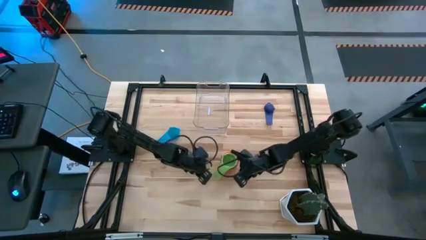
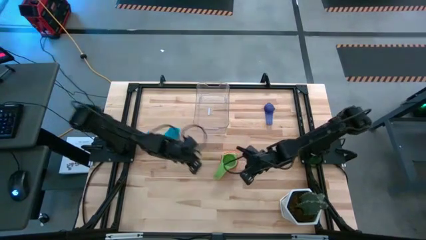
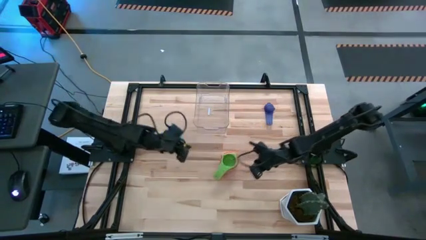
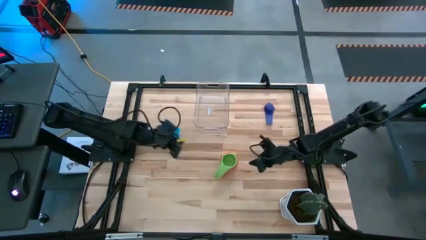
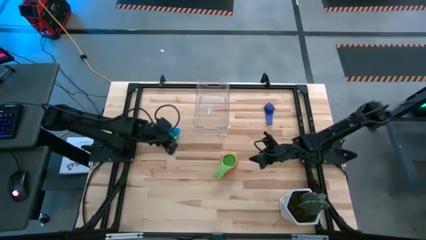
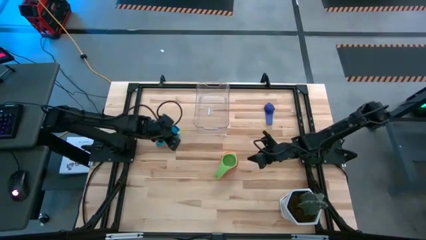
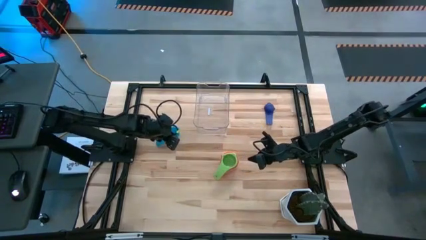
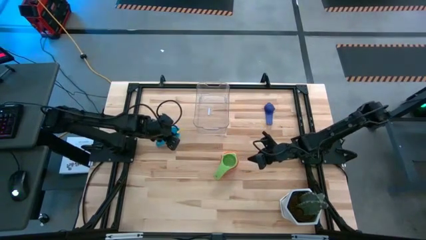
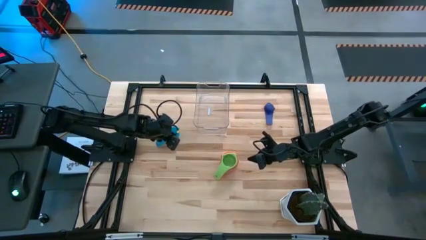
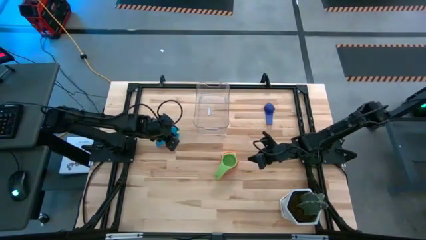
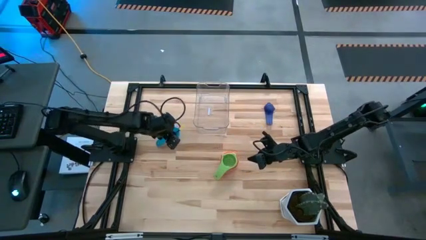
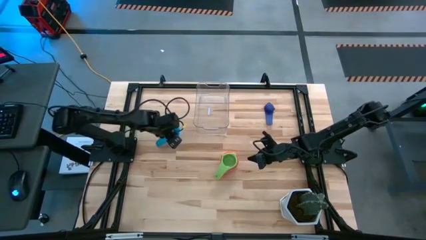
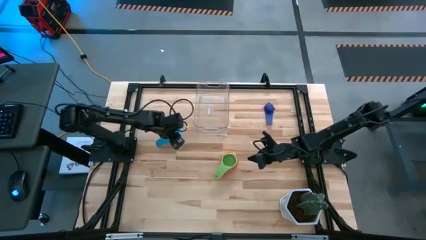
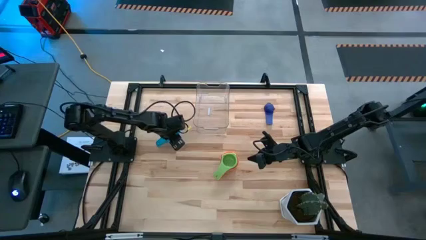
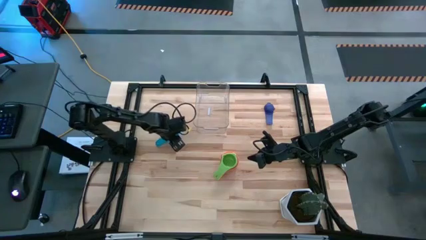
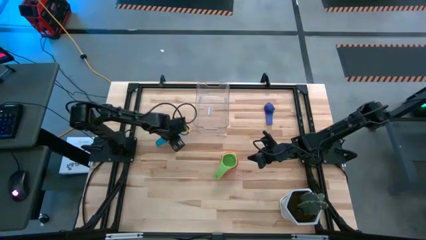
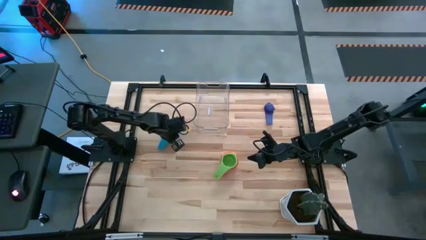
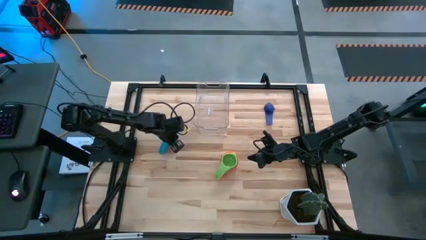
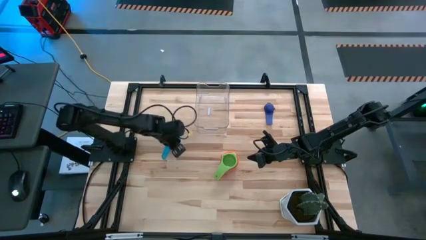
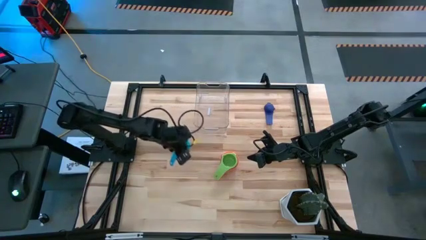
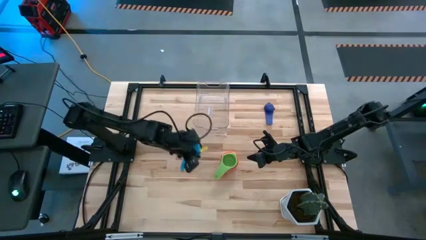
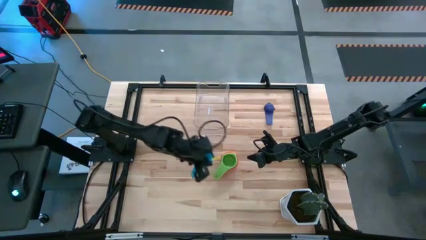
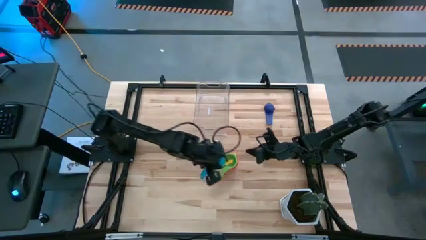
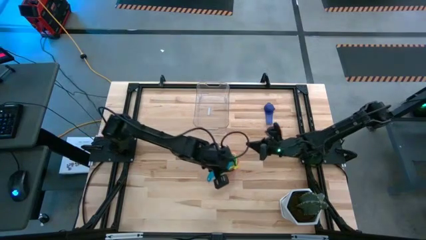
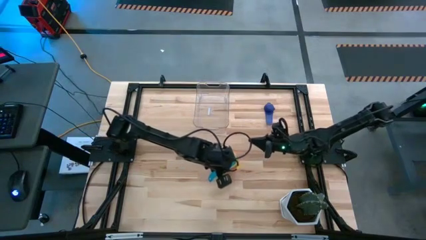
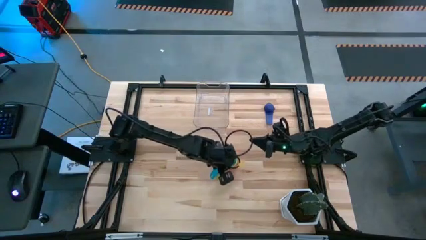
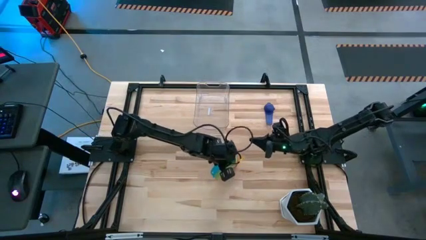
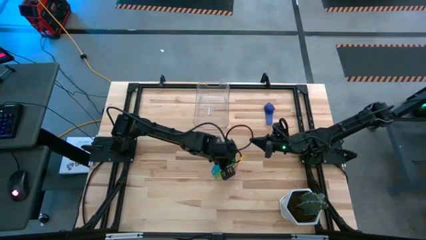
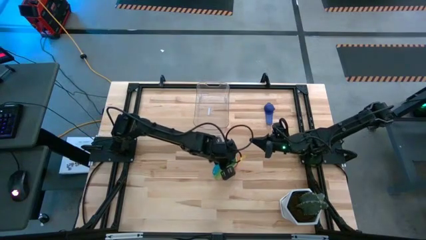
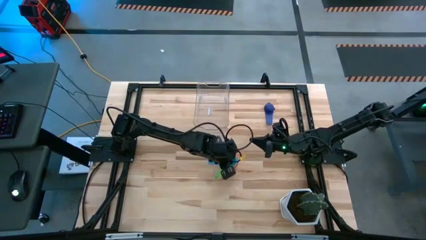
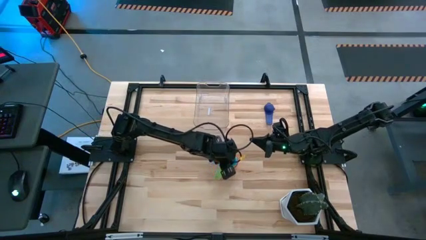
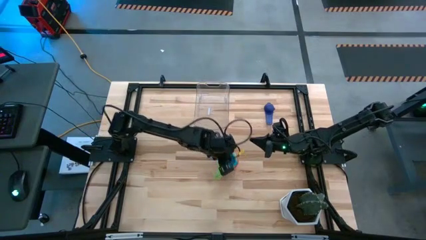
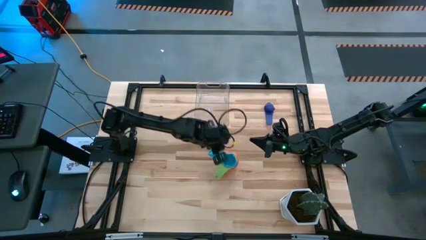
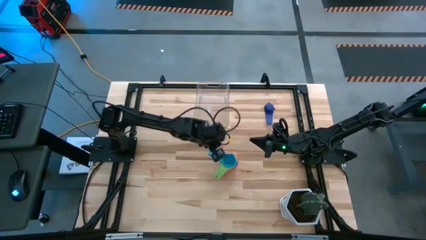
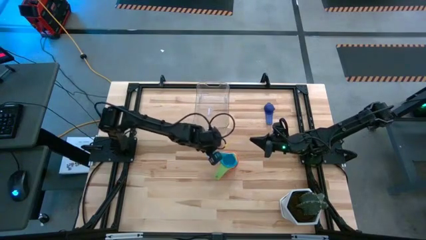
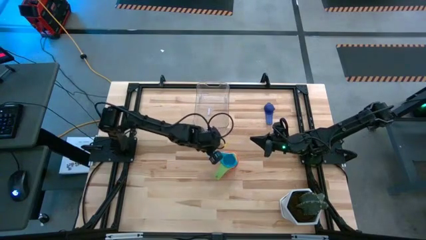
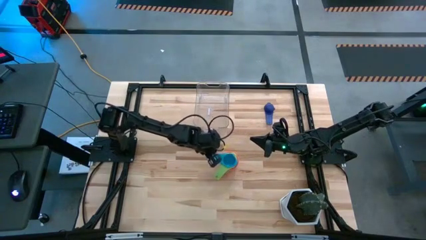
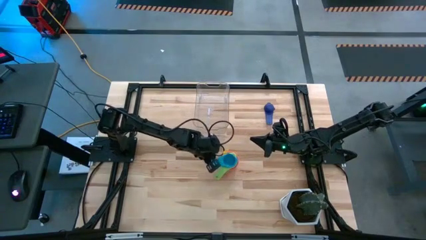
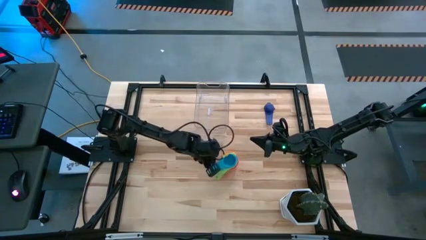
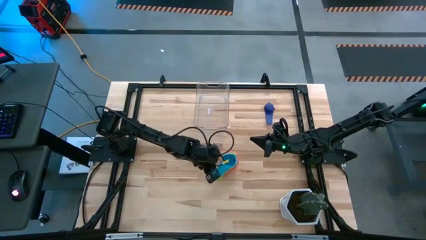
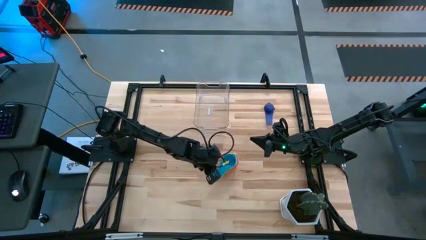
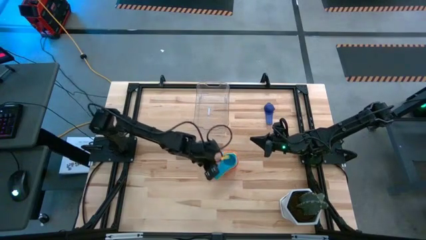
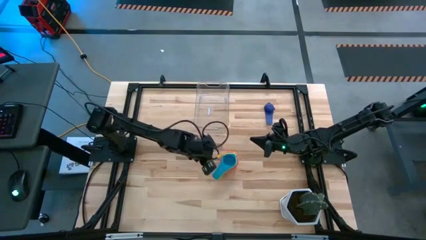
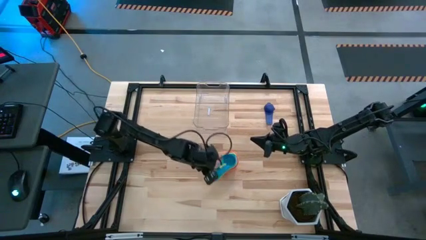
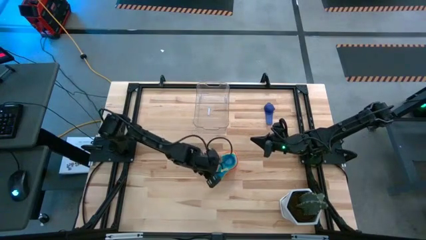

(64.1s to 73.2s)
Task: Nest measuring cups in basket
Stack the light blue measuring cup on top of the green measuring cup

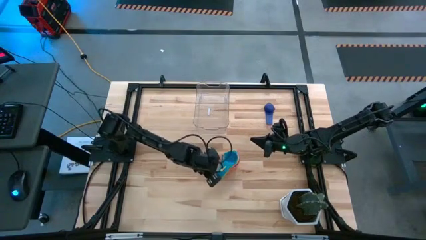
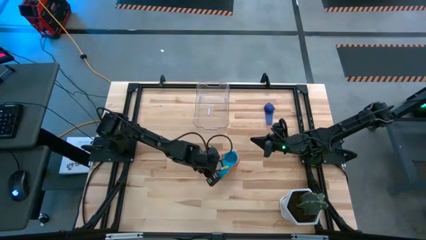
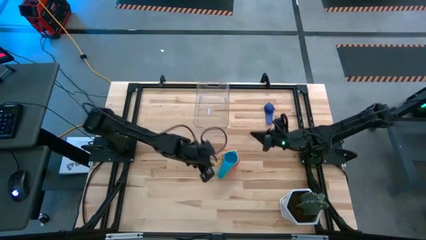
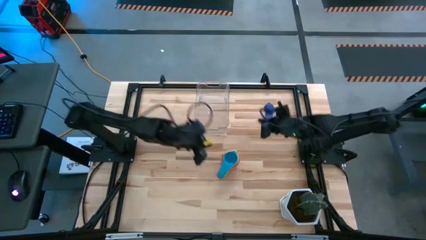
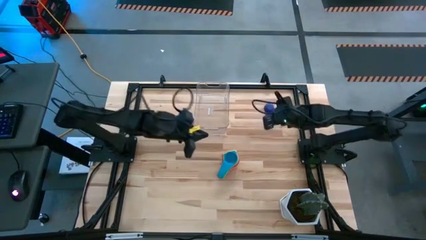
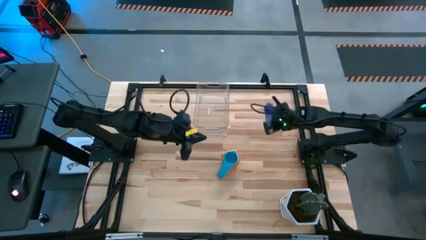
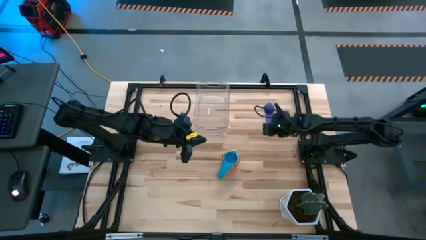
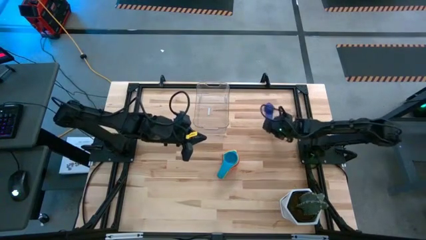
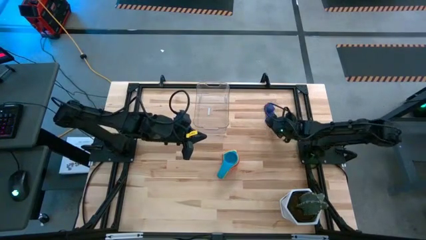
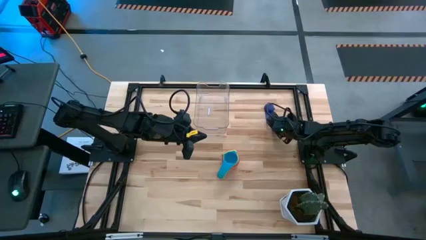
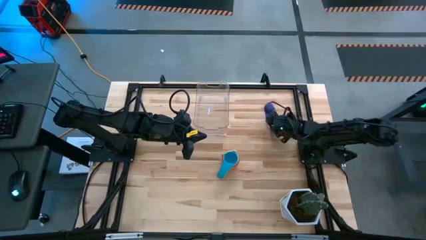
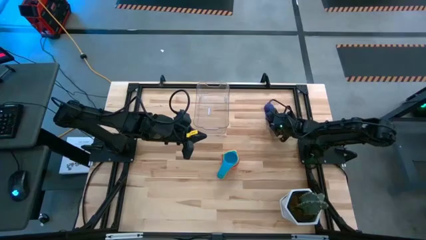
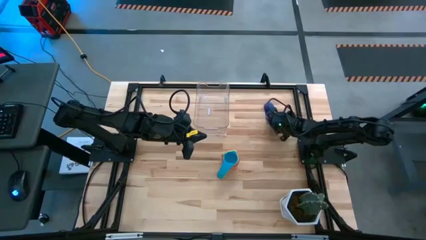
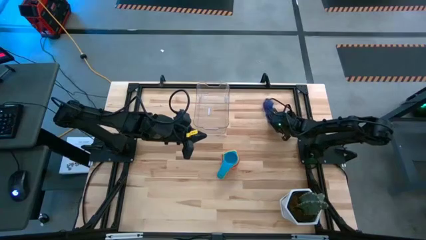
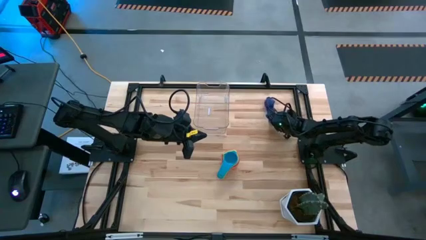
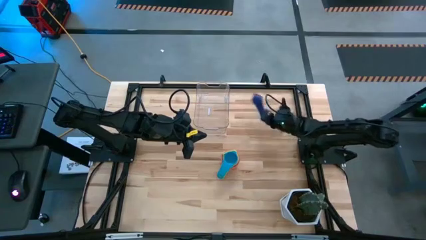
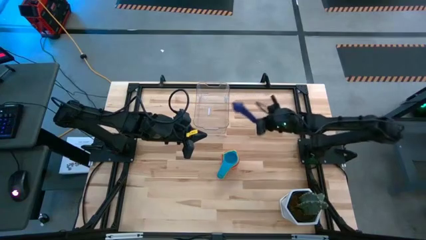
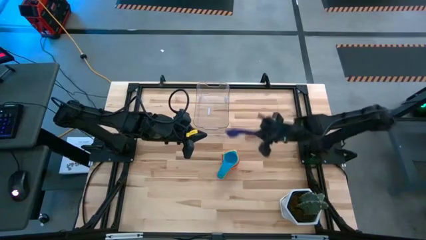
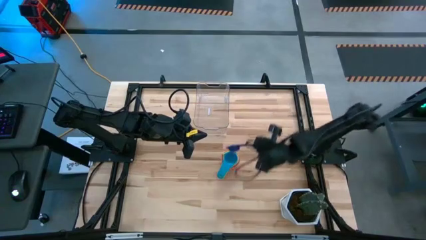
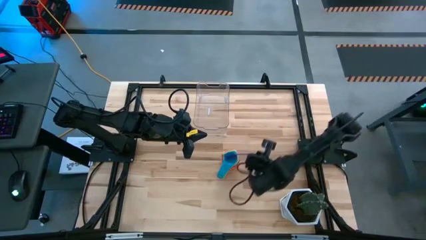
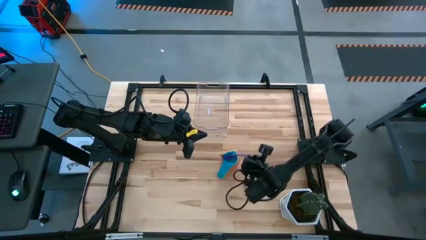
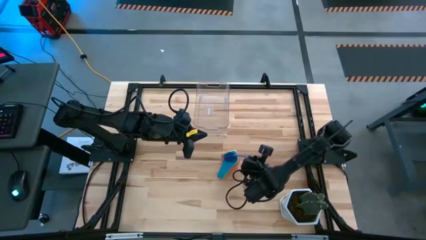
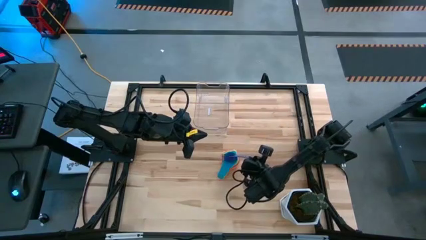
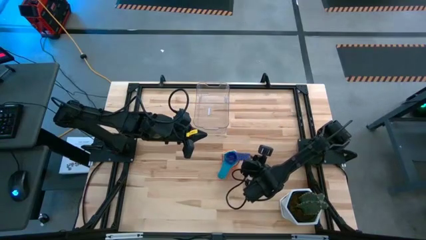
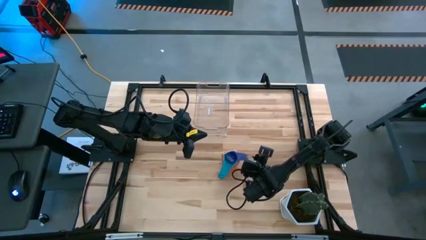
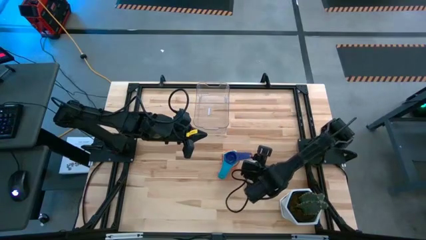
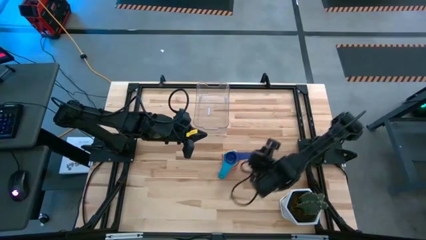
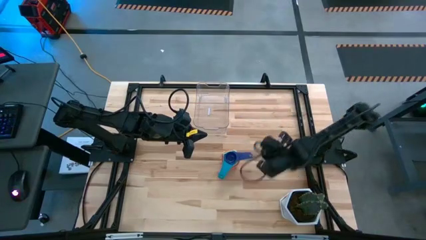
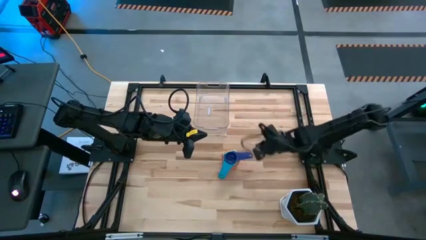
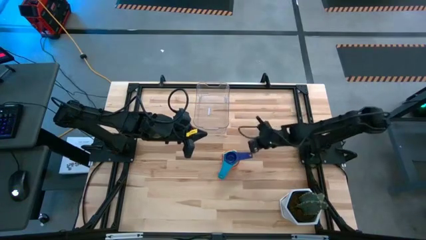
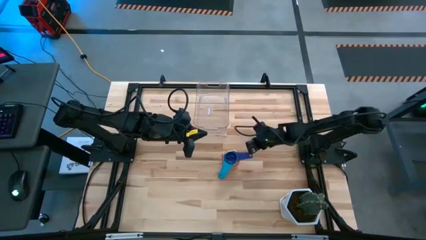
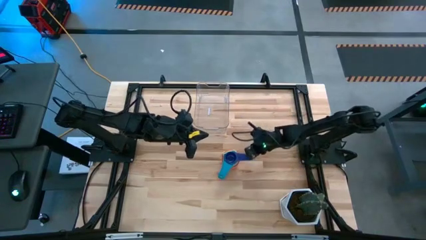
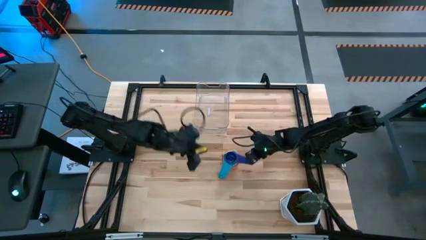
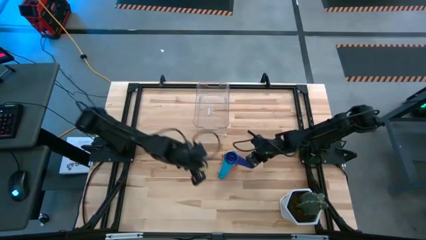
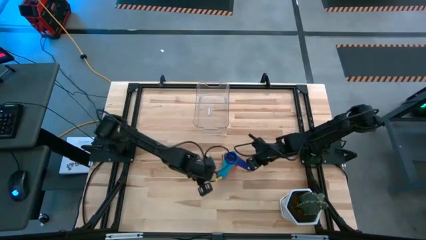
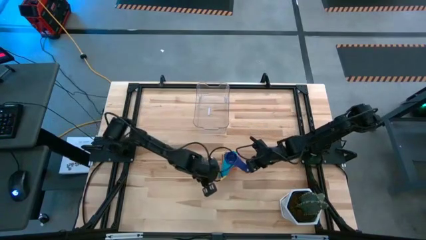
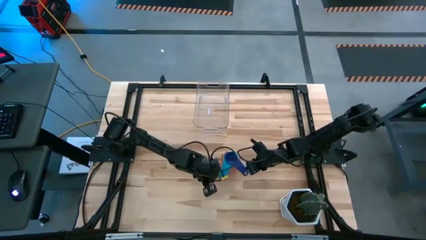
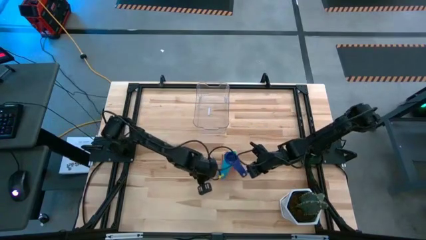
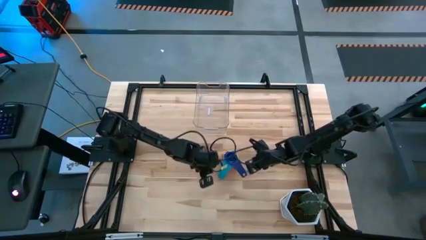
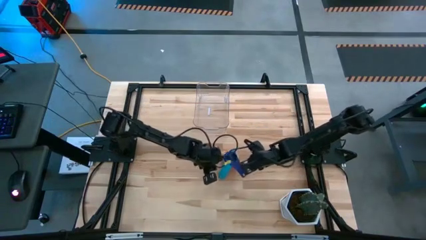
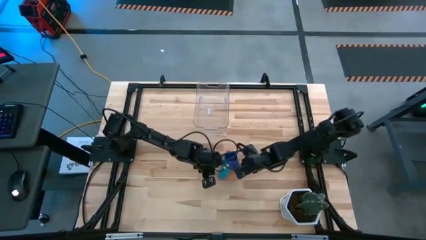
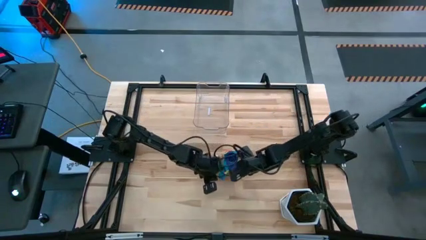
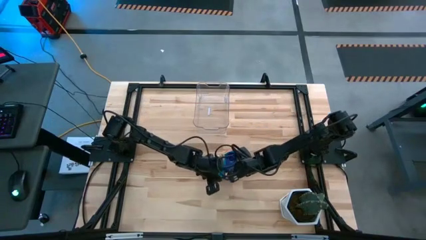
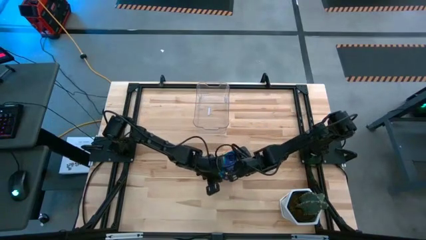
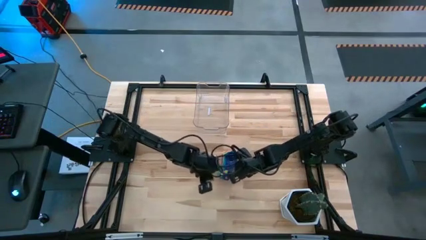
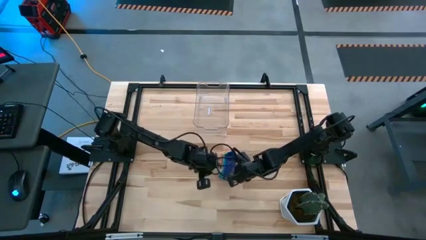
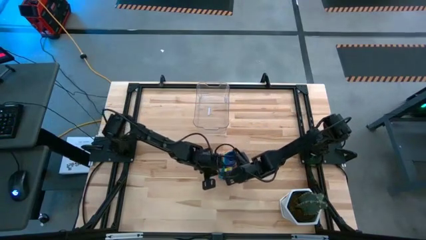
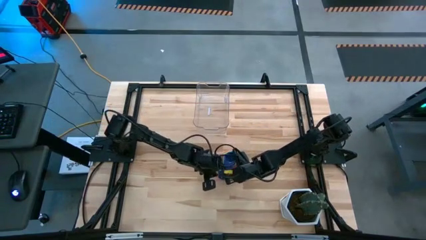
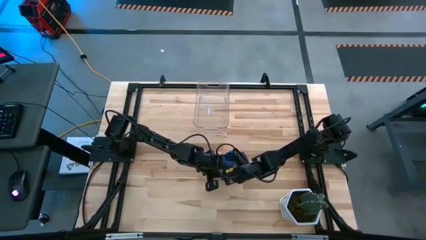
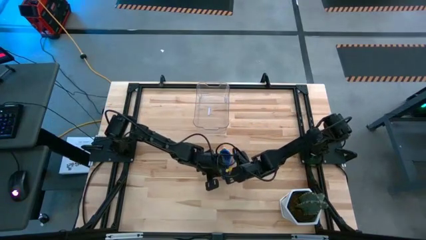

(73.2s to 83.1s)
Stack the dark blue measuring cup on top of the light blue measuring cup
